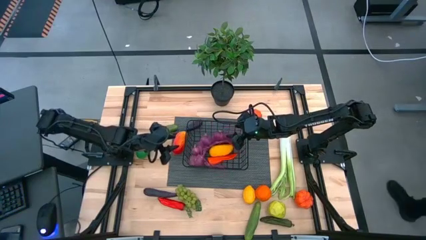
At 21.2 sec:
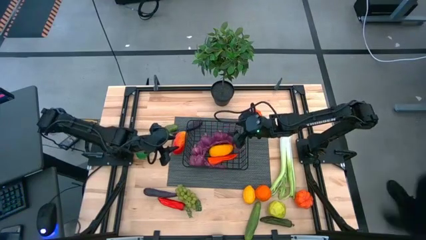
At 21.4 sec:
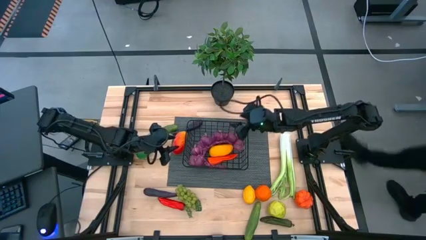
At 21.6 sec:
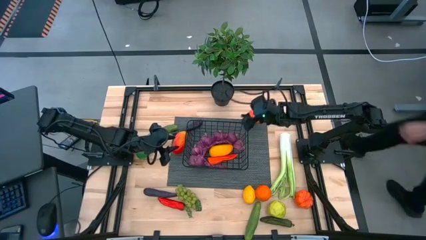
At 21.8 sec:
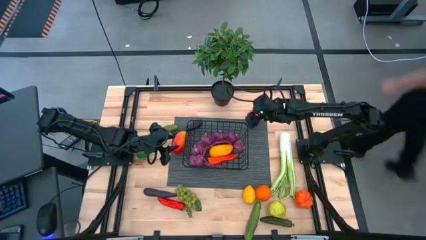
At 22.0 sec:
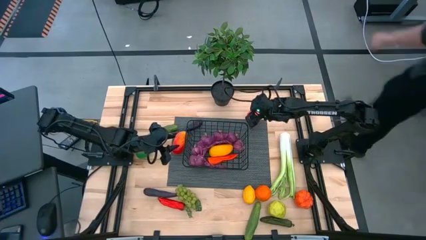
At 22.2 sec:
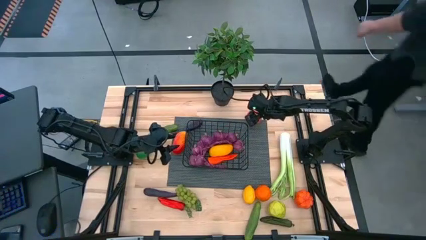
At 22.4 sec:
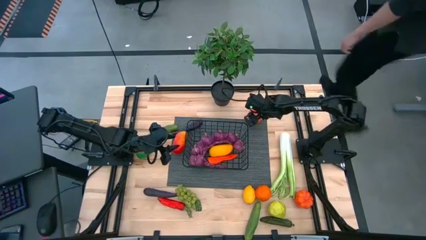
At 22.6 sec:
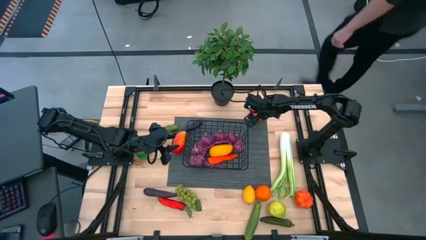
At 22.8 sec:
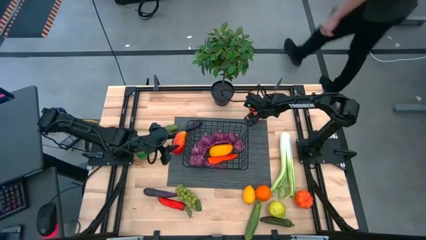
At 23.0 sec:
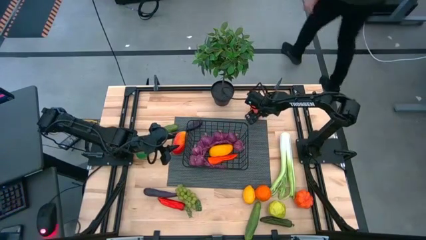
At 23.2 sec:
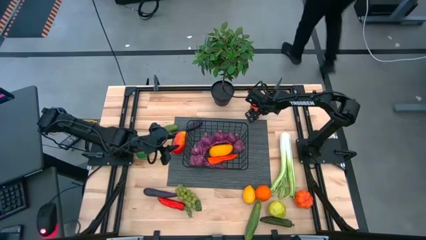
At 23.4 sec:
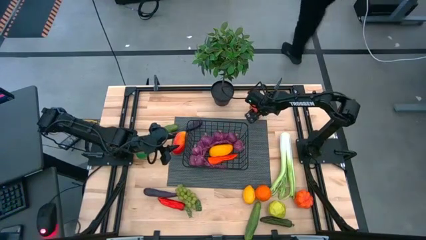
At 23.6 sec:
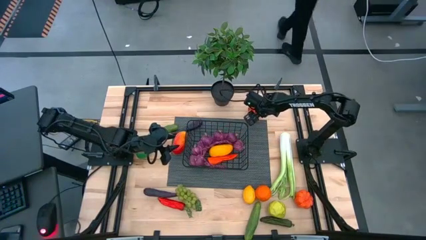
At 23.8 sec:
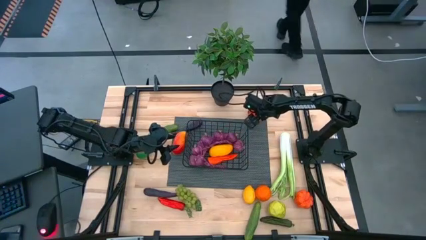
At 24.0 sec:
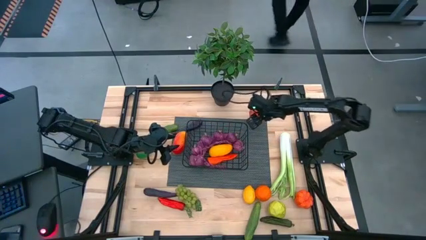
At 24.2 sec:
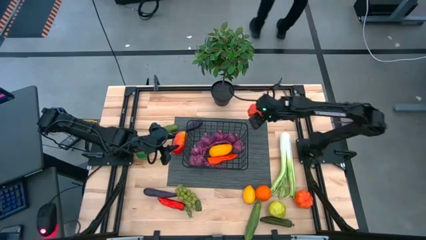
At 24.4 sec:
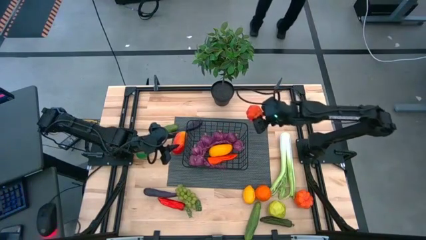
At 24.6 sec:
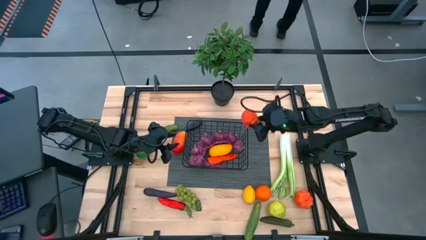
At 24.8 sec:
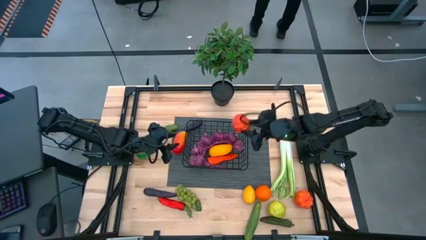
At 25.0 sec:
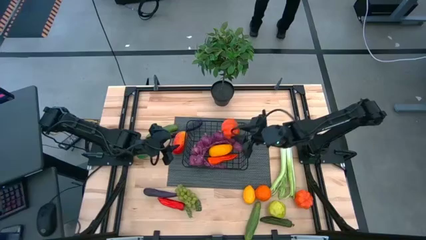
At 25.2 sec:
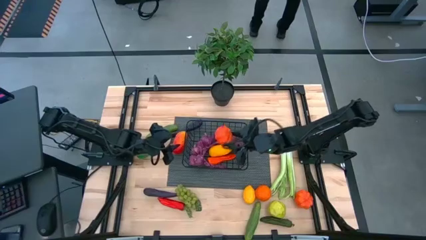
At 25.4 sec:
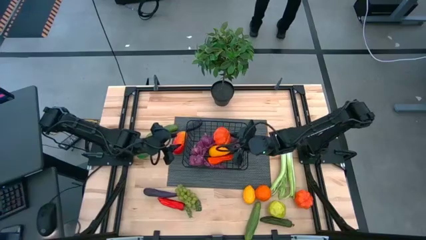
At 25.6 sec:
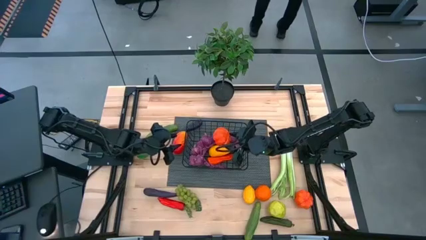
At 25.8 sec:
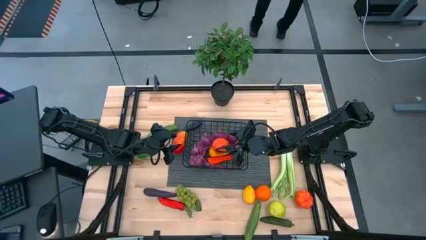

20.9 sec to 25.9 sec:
Task: Build produce basket
Put the top pumpkin into the wire basket

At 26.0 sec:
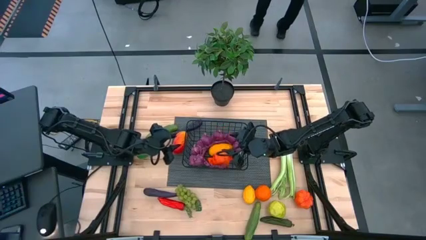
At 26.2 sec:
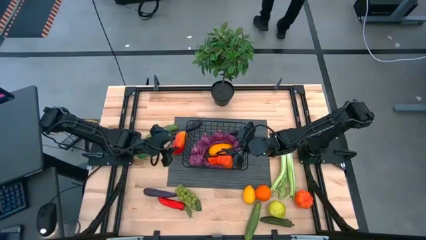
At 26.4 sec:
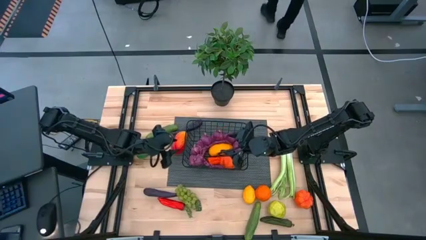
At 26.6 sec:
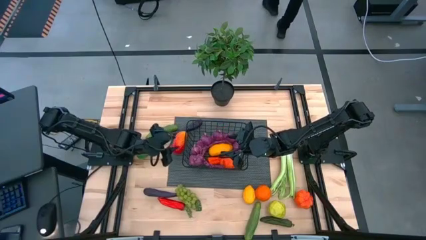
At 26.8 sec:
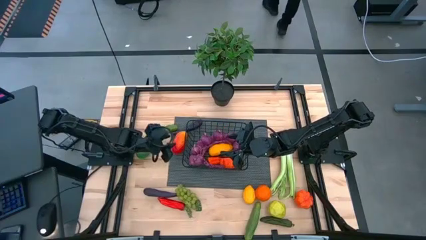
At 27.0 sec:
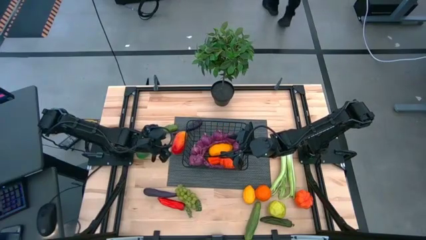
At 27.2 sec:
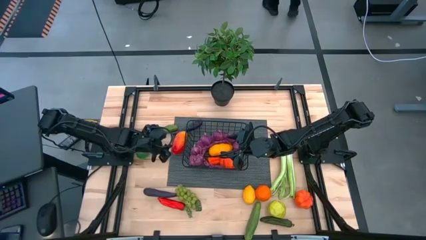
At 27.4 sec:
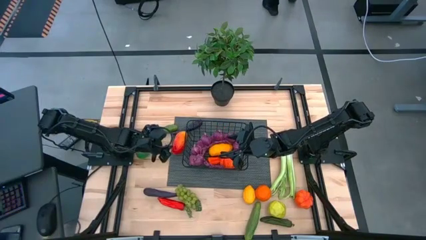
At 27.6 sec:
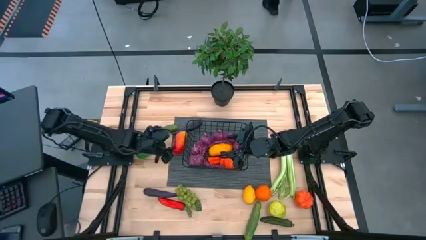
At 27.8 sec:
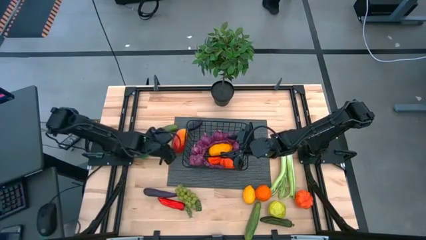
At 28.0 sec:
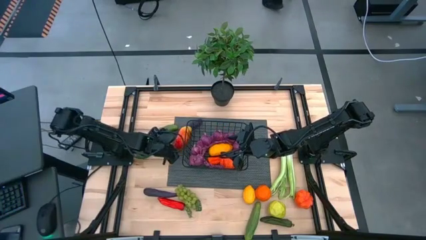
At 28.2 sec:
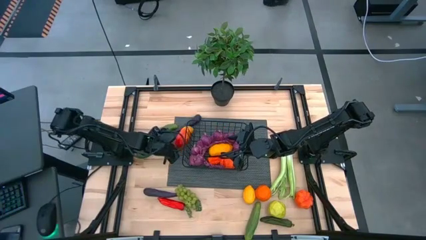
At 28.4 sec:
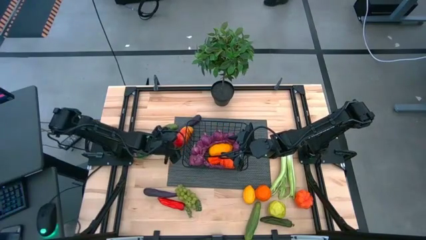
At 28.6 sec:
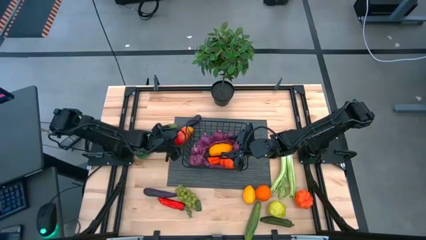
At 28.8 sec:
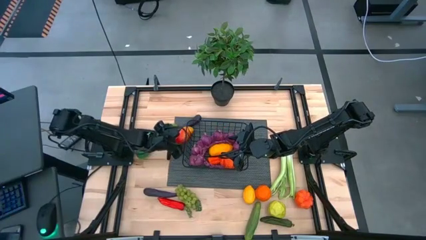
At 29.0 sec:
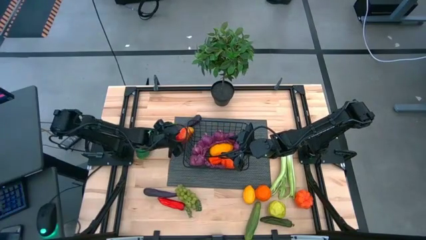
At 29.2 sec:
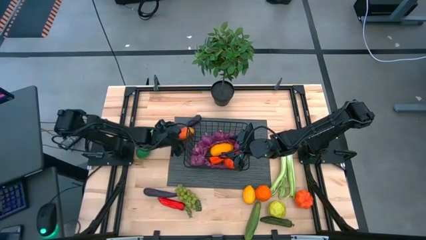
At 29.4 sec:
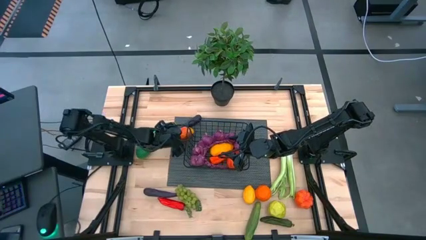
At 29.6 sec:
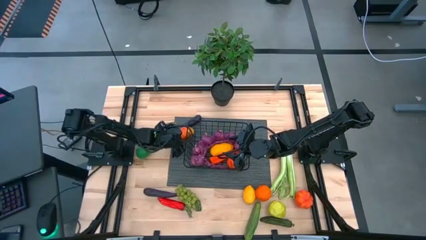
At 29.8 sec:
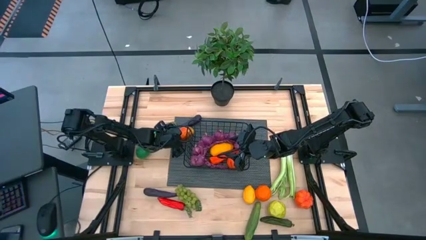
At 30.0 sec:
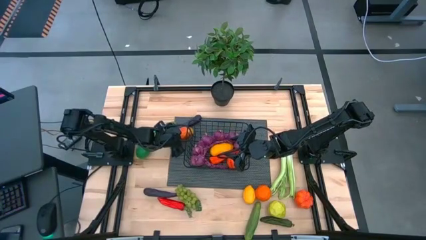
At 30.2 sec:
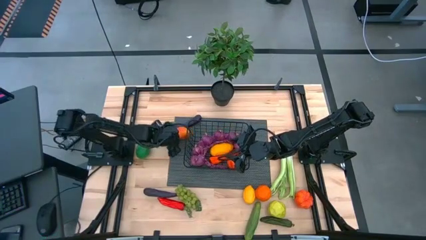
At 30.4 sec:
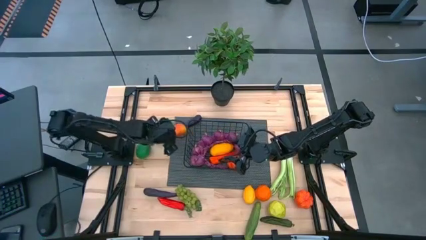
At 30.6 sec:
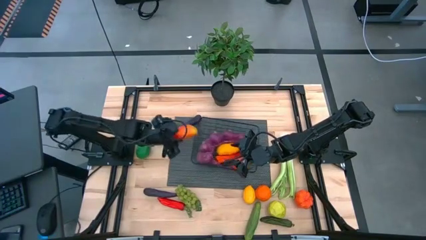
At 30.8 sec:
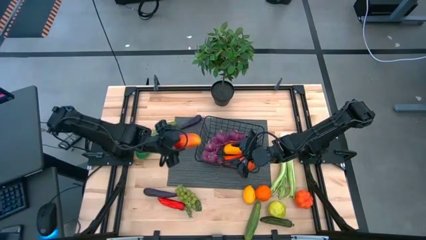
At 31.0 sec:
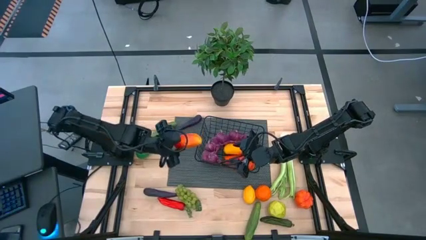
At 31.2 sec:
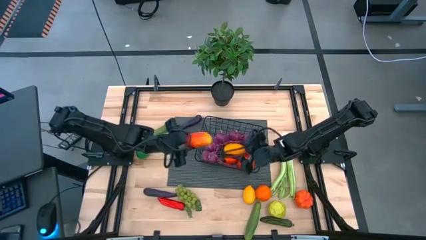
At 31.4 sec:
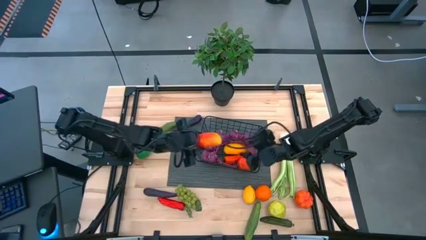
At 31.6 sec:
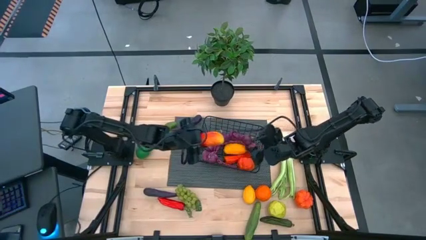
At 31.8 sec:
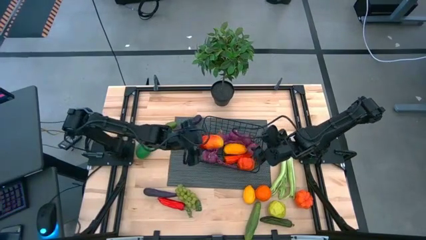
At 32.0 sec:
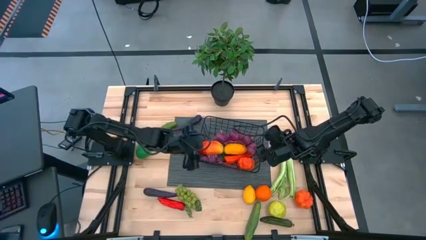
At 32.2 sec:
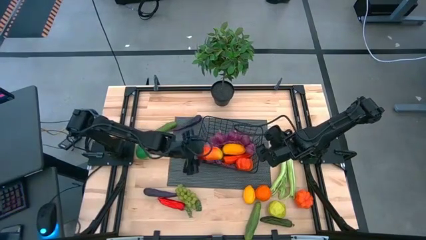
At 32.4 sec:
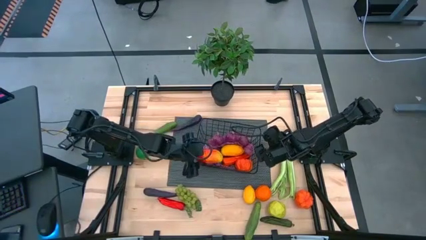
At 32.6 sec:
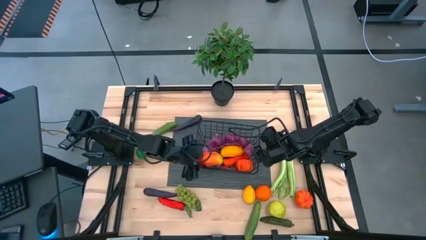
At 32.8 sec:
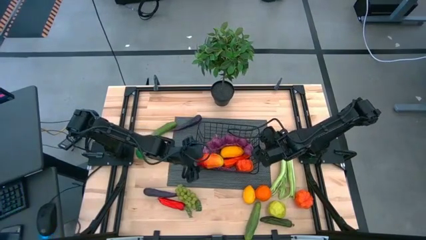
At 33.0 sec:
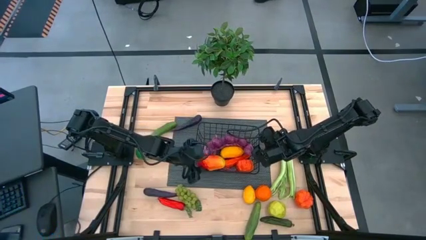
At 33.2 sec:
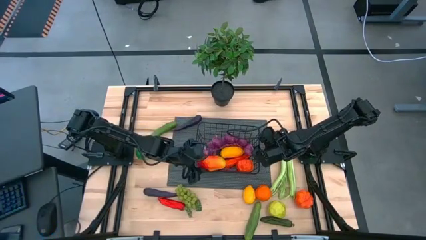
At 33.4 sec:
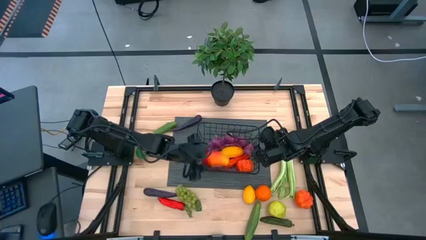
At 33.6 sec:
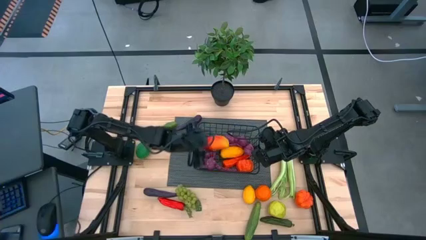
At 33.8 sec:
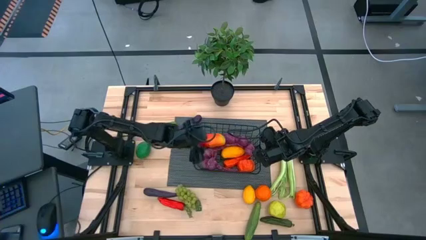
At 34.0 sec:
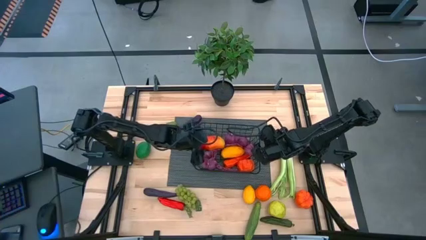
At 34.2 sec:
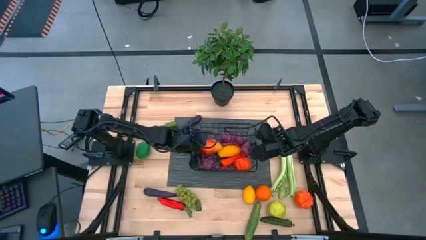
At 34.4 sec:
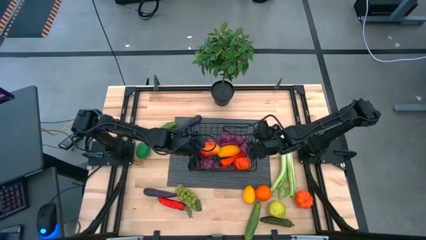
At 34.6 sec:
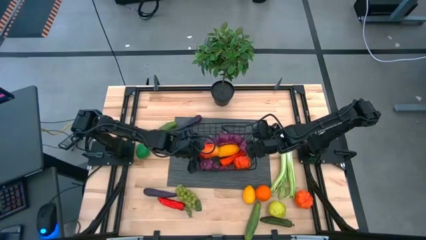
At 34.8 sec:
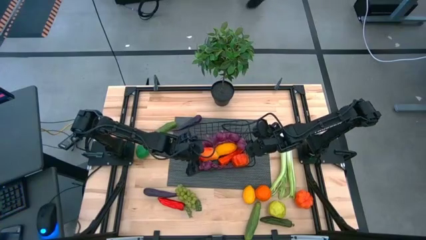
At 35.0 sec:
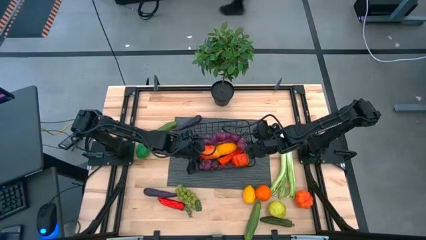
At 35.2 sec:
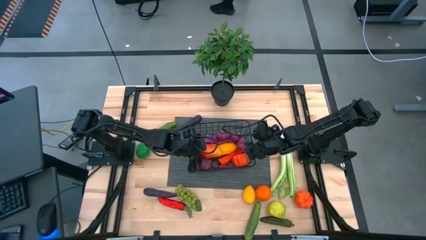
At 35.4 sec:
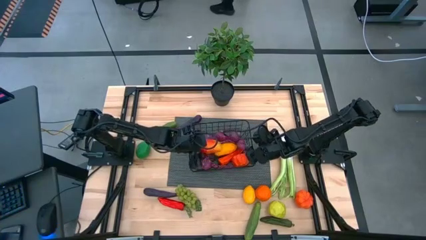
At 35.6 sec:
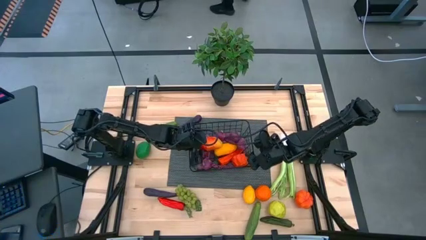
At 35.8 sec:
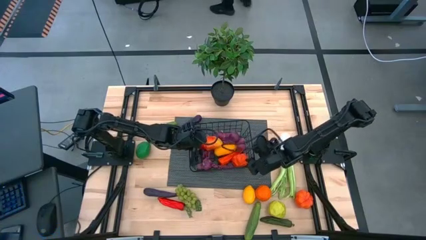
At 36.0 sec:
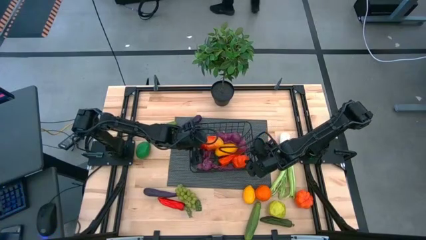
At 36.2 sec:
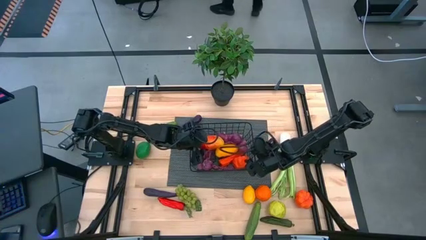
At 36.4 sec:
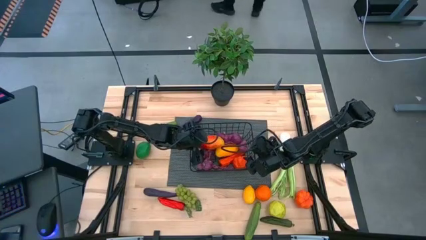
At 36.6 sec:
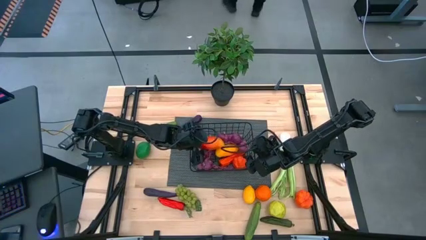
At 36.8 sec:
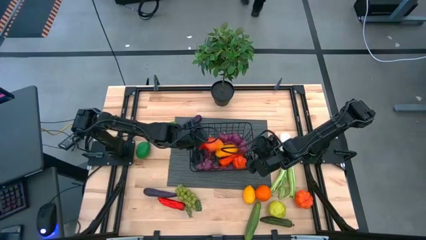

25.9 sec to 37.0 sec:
Put the red mango into the wire basket
